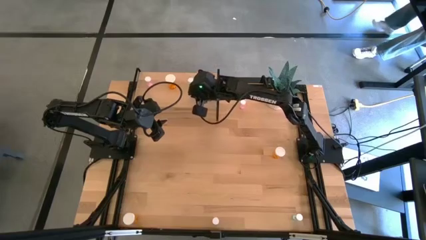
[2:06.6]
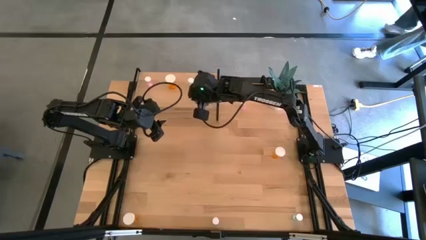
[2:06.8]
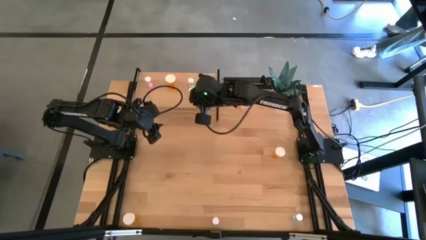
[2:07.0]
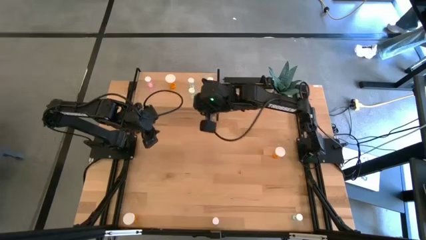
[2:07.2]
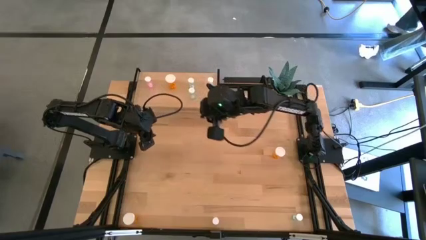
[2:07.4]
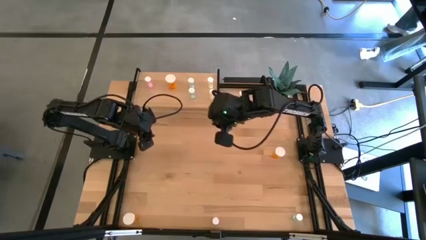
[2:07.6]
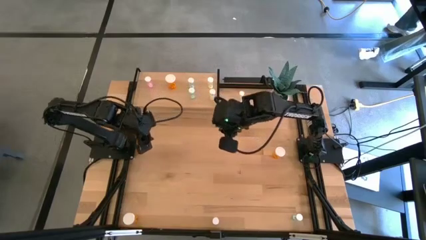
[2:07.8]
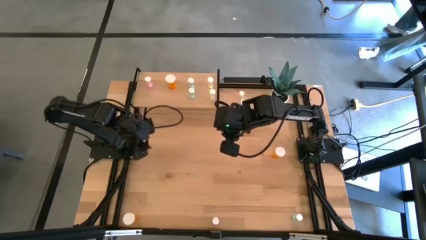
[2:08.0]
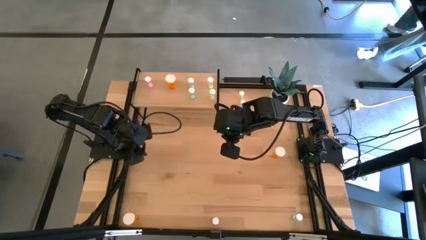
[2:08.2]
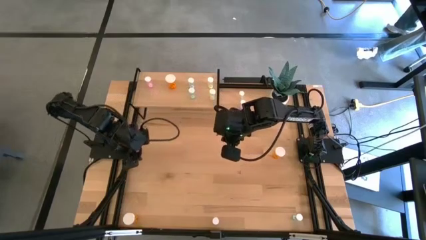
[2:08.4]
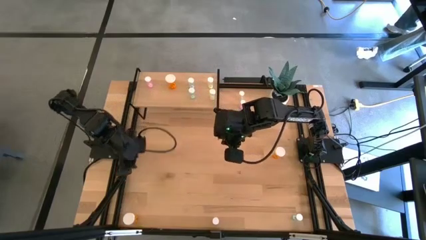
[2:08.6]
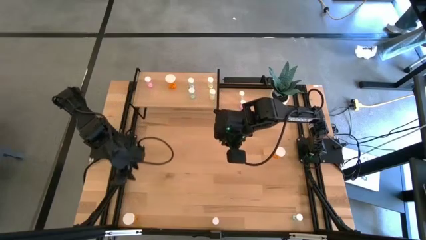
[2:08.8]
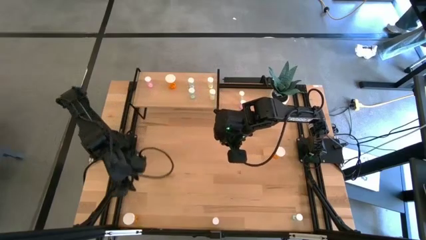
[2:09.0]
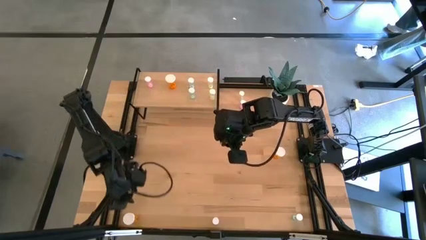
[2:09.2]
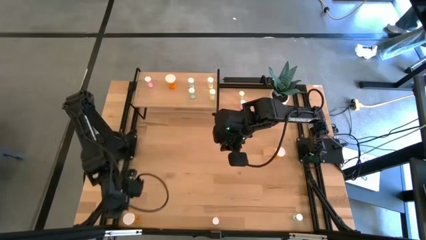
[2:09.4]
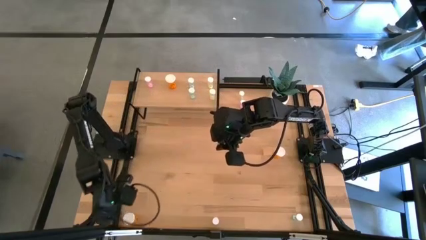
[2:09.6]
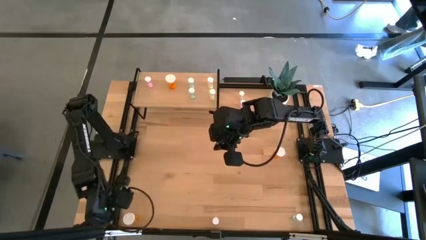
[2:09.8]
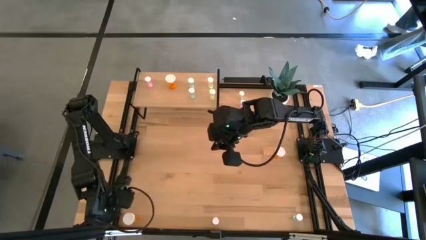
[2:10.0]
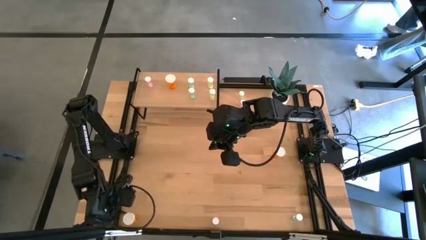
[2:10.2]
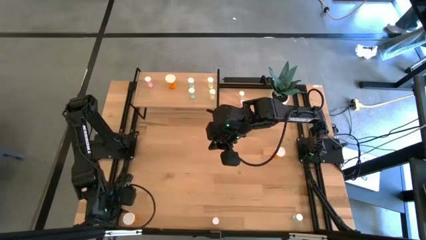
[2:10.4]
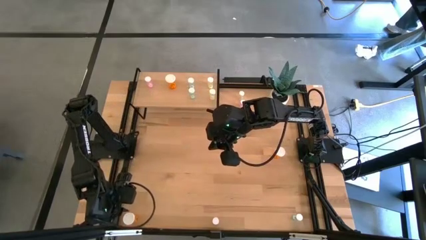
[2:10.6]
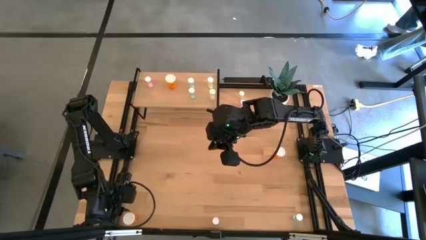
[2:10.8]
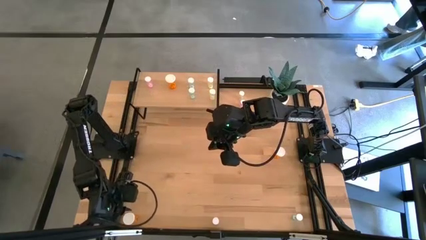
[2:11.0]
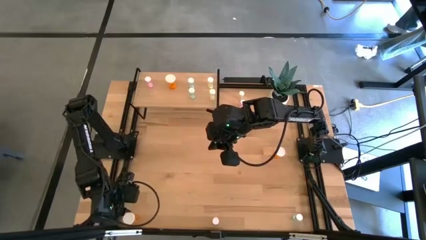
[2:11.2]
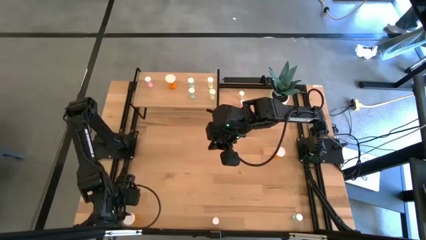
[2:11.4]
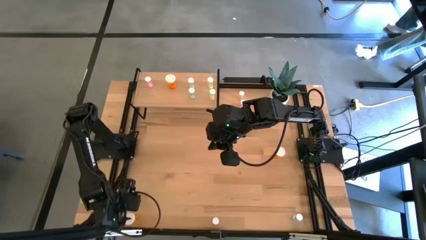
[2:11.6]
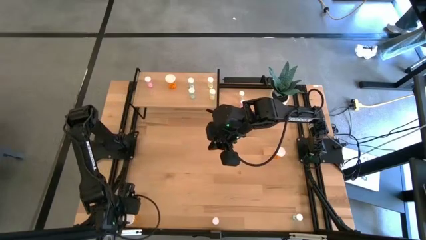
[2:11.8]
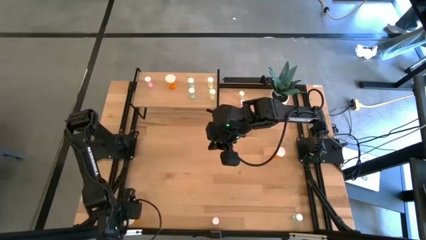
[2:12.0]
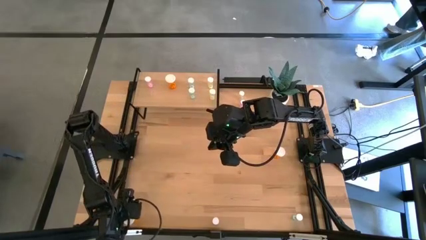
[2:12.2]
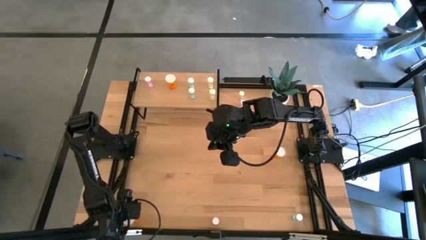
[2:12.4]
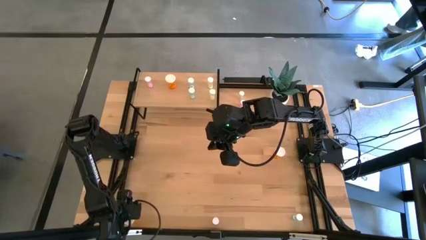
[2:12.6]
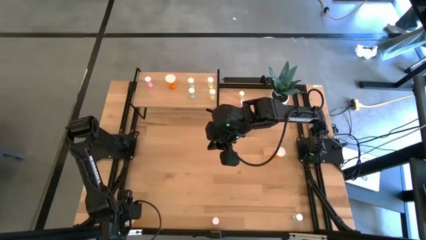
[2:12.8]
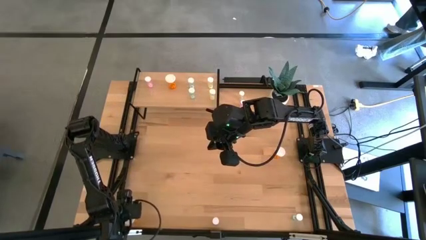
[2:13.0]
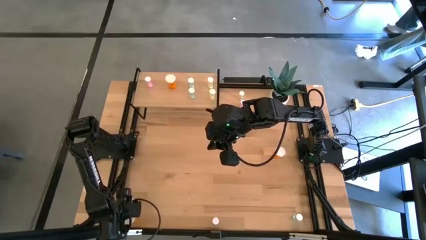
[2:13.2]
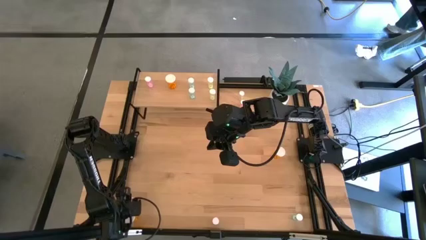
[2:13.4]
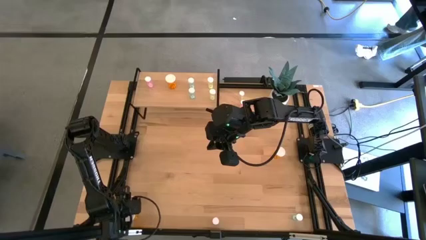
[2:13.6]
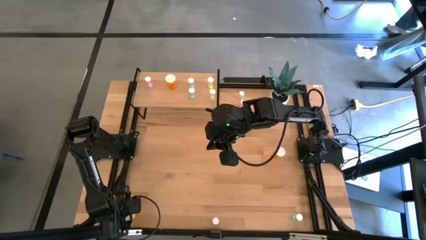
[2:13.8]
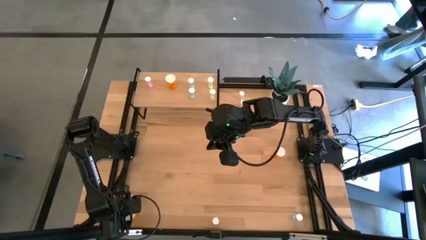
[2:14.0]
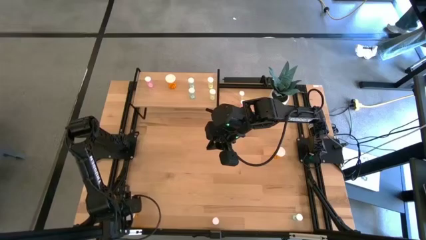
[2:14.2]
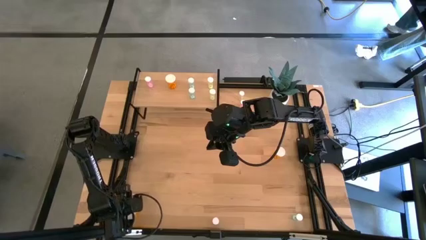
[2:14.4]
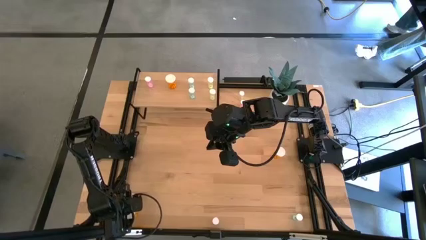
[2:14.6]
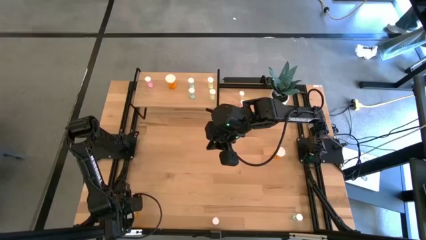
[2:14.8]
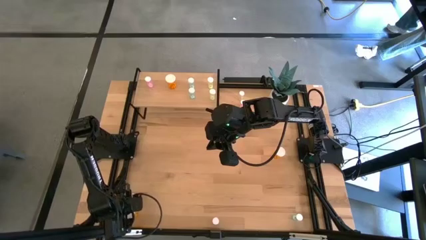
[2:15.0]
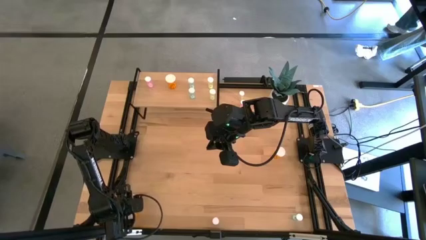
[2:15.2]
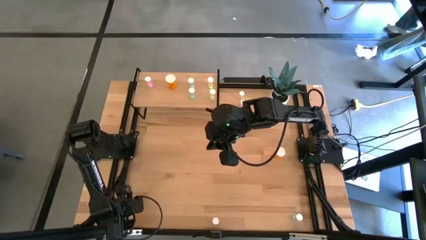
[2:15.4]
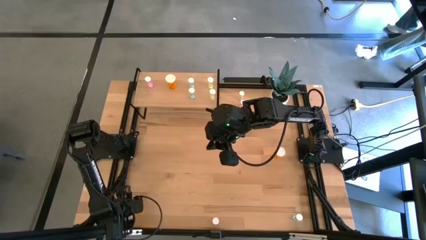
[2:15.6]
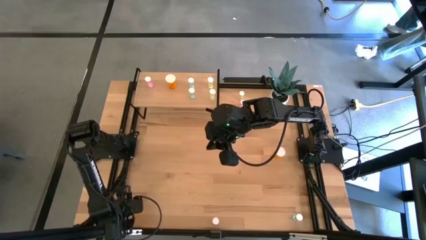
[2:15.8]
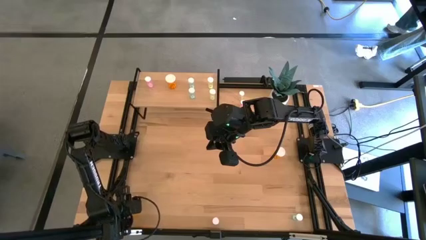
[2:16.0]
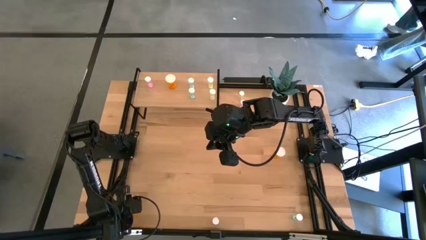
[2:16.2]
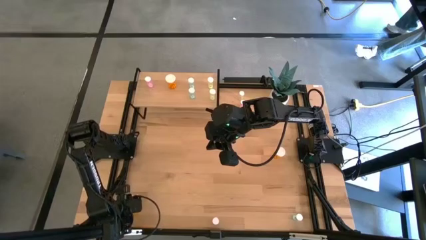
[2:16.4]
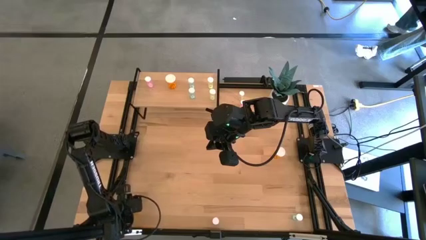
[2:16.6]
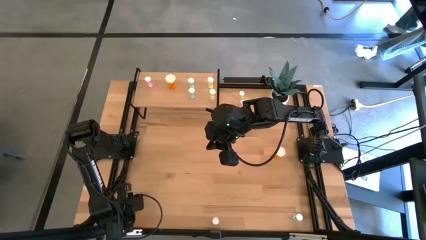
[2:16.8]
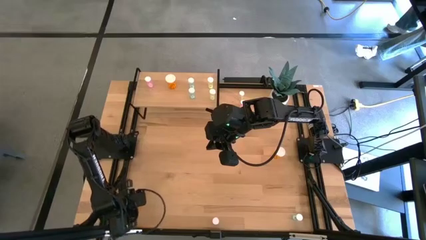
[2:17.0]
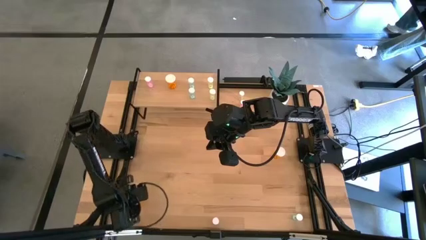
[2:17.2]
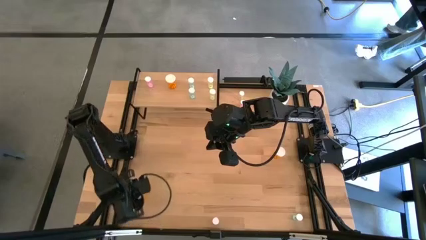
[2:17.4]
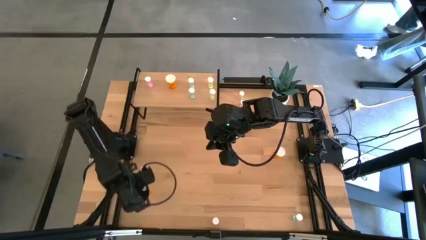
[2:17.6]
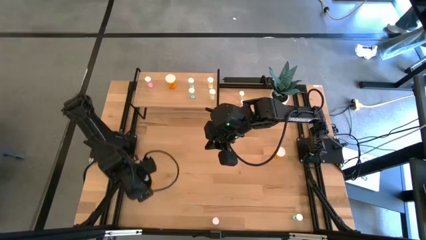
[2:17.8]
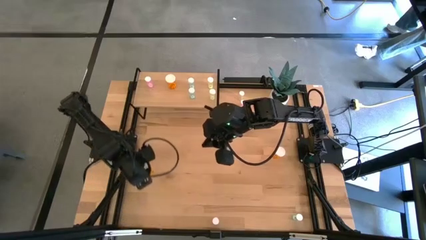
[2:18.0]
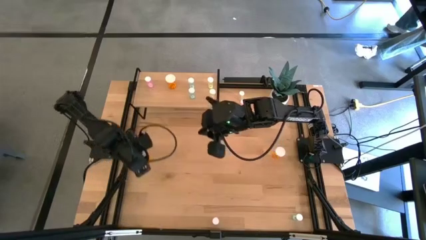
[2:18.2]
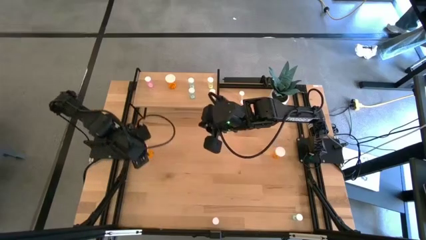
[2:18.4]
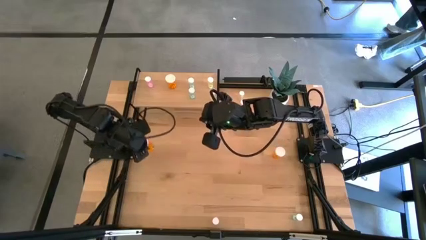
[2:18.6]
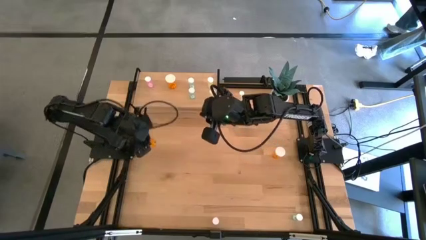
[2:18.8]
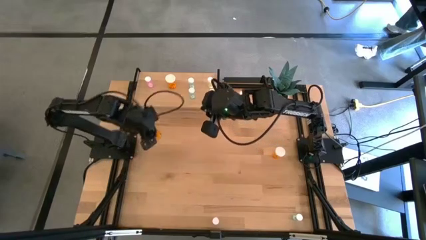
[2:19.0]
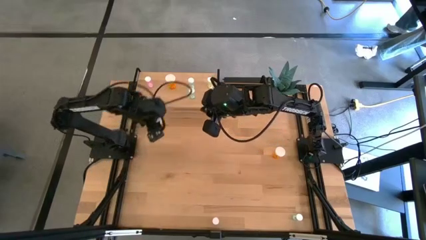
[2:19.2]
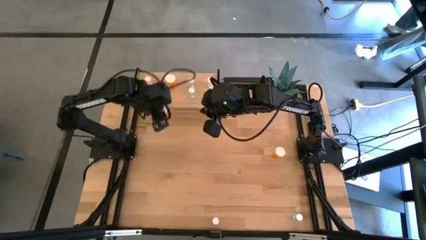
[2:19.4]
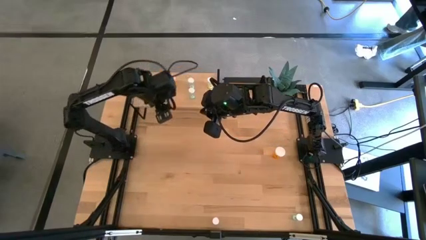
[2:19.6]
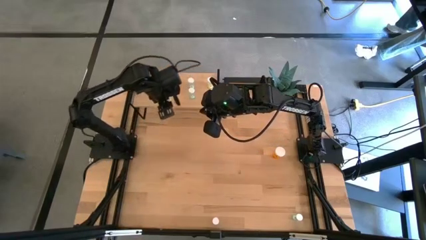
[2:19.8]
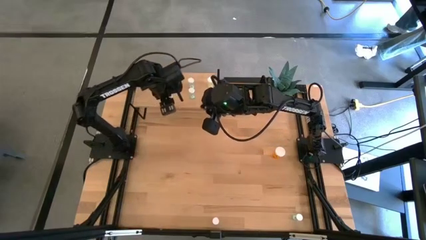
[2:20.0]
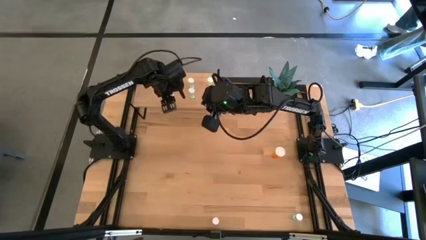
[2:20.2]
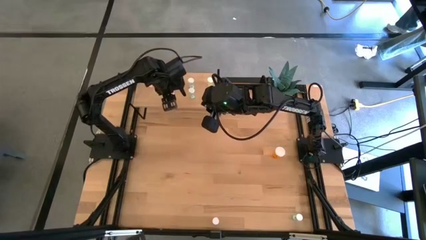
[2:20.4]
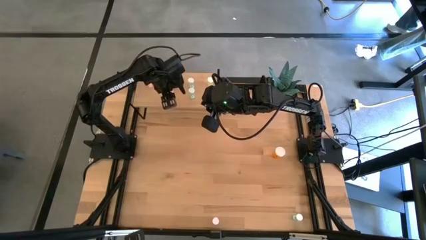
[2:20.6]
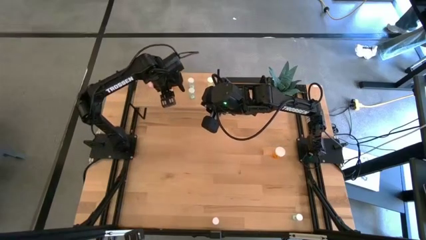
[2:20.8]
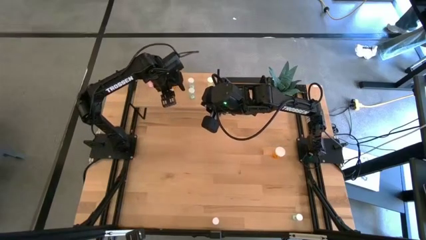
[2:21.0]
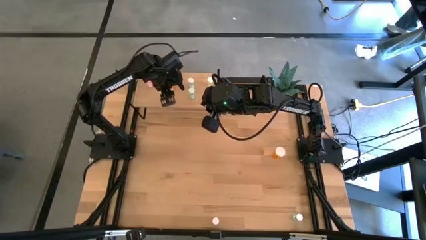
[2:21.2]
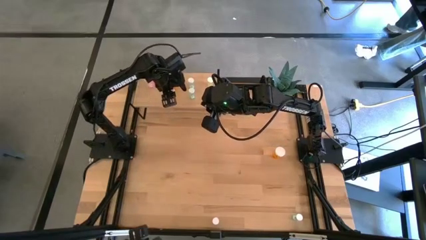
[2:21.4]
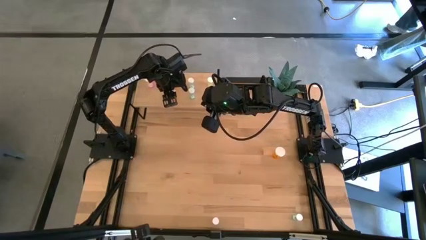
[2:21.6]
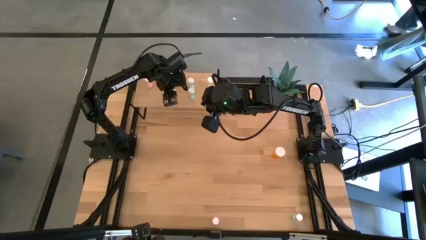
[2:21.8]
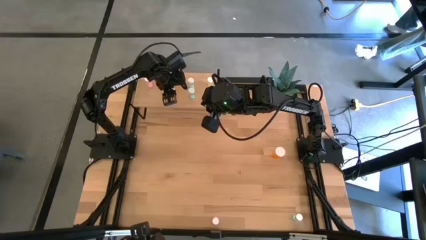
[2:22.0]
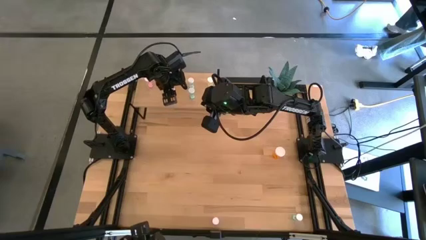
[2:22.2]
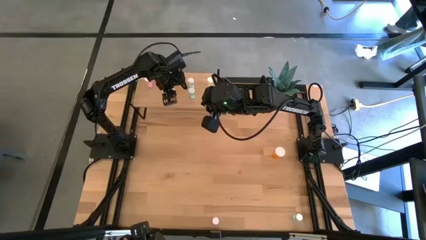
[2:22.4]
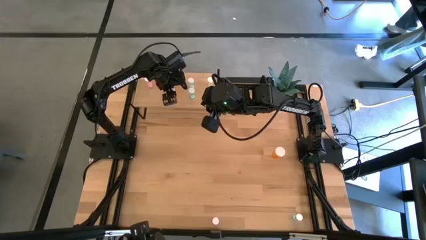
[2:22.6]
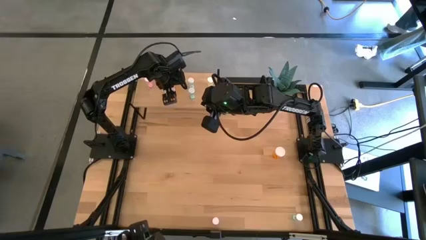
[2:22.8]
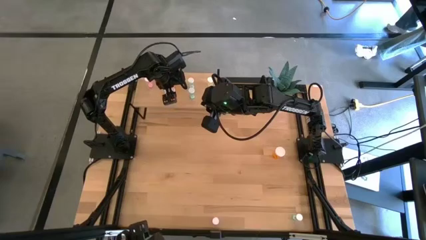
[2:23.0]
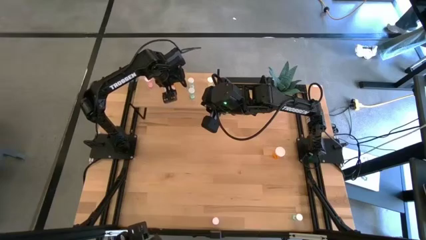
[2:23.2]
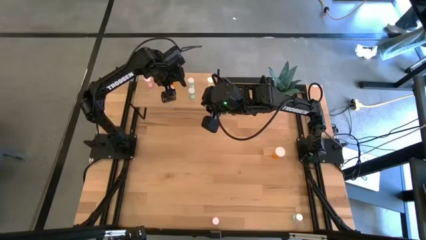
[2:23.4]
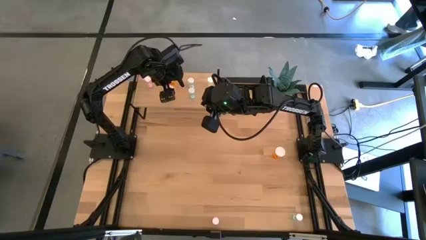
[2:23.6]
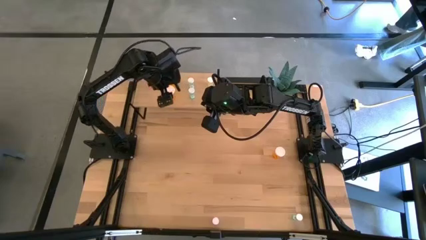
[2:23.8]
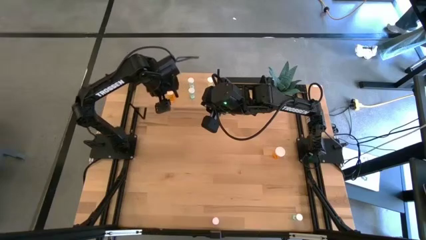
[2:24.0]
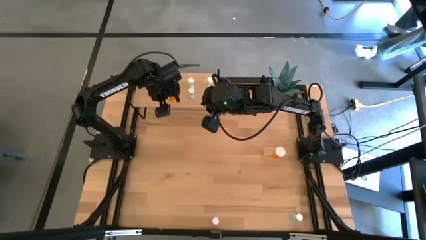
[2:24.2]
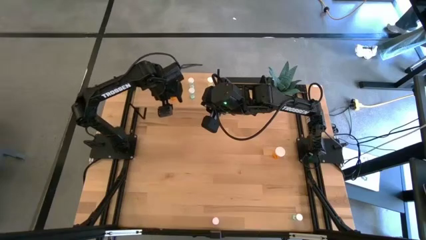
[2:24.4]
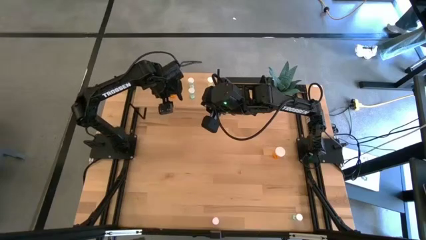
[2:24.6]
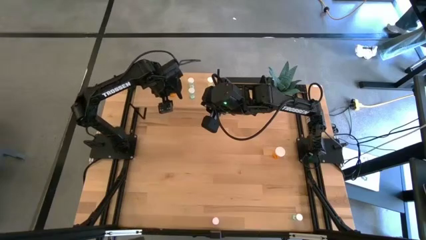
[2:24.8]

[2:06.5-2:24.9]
Task: Pick and place medicine bottles onto shelf by color
Put the bottom orange pill bottle on the shelf aligned with the other orange pill bottle
